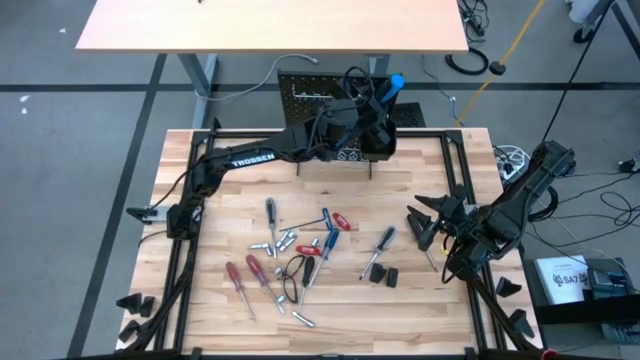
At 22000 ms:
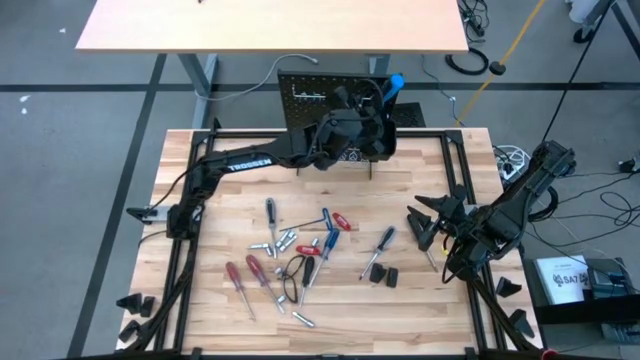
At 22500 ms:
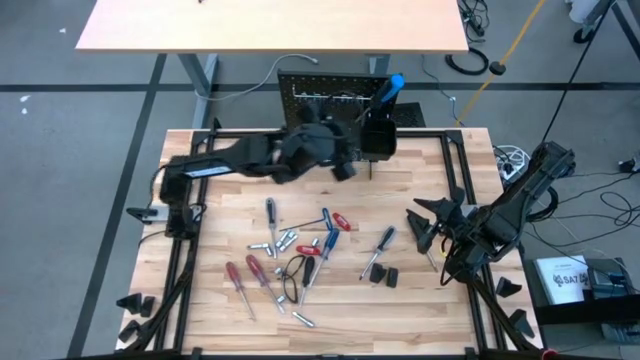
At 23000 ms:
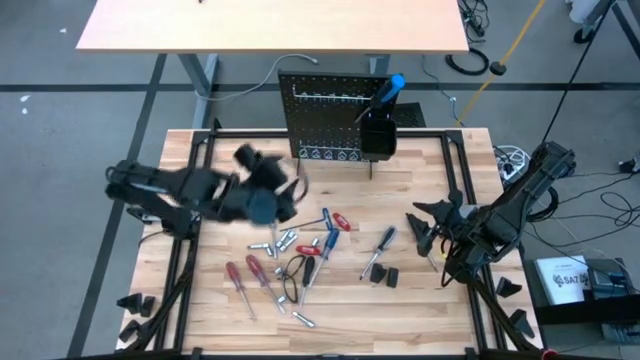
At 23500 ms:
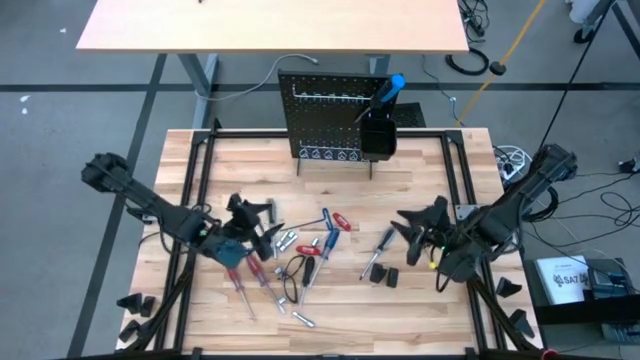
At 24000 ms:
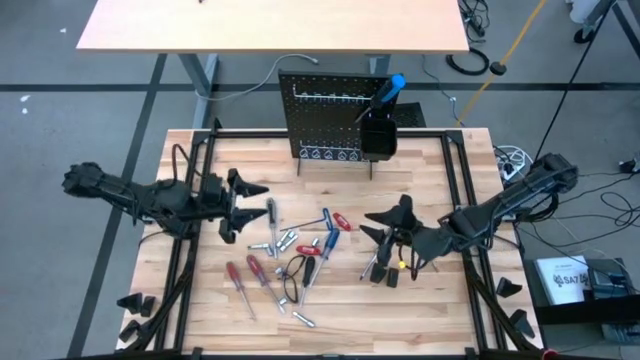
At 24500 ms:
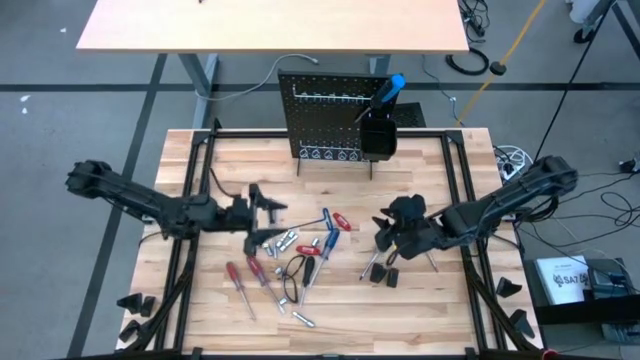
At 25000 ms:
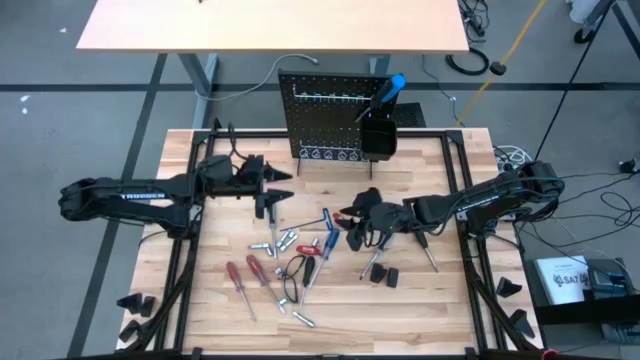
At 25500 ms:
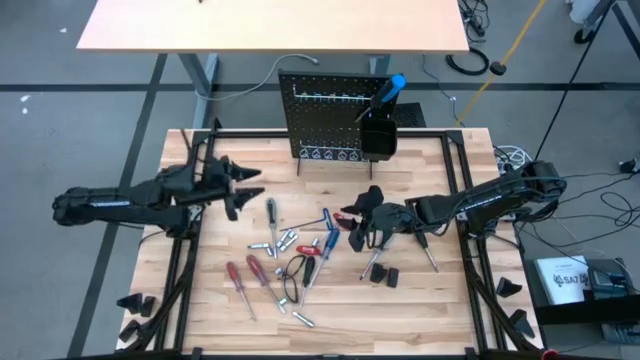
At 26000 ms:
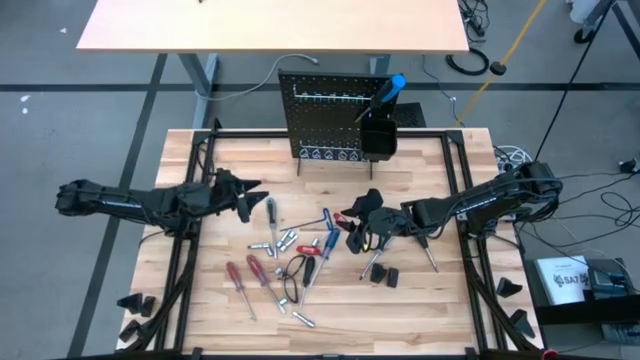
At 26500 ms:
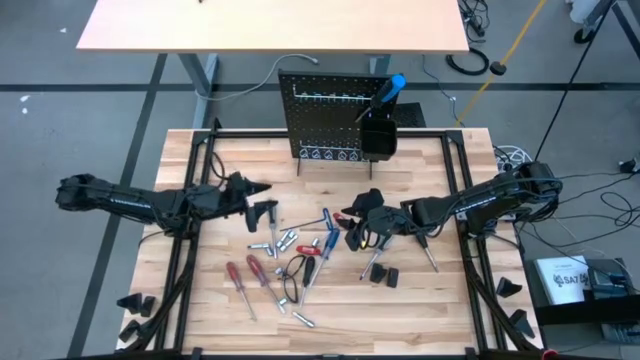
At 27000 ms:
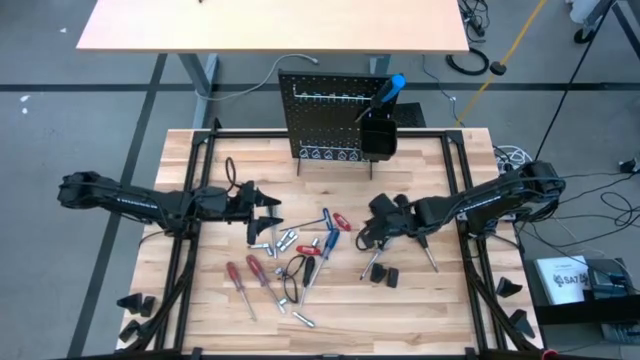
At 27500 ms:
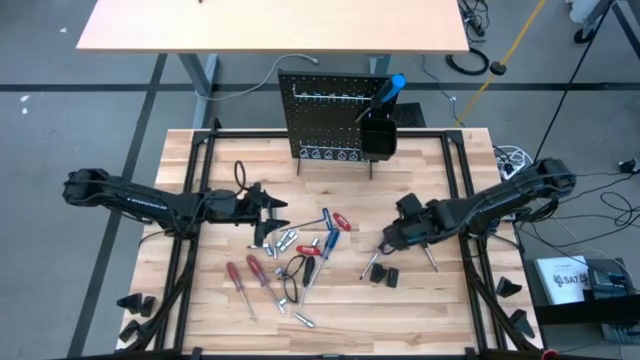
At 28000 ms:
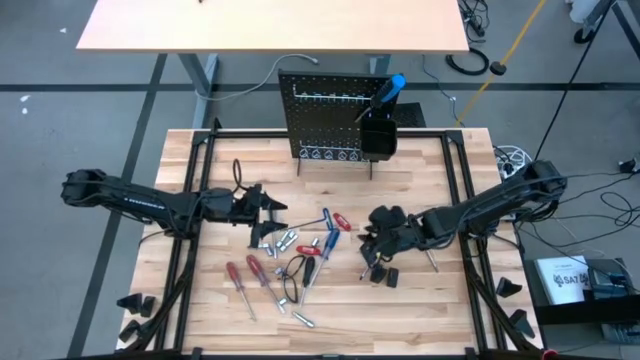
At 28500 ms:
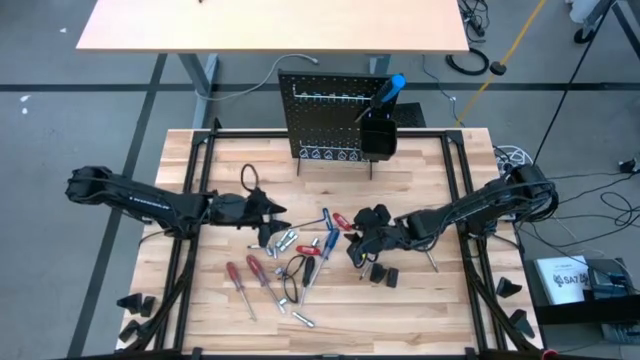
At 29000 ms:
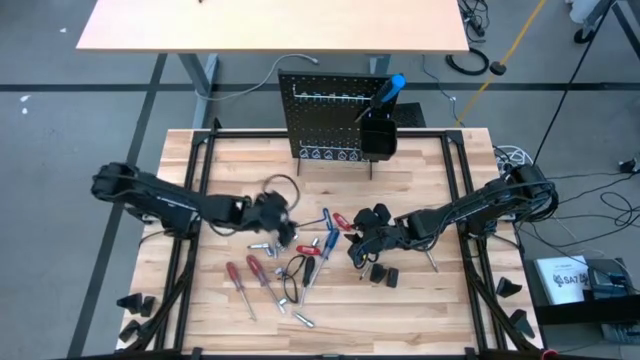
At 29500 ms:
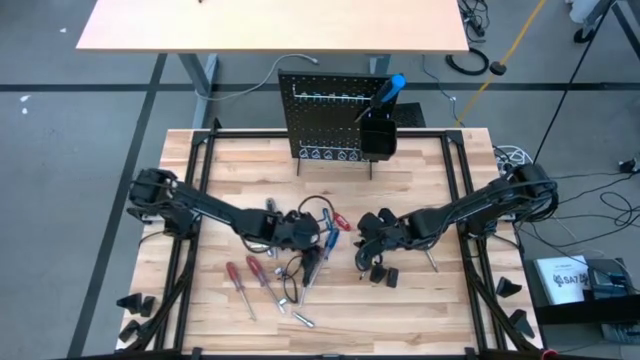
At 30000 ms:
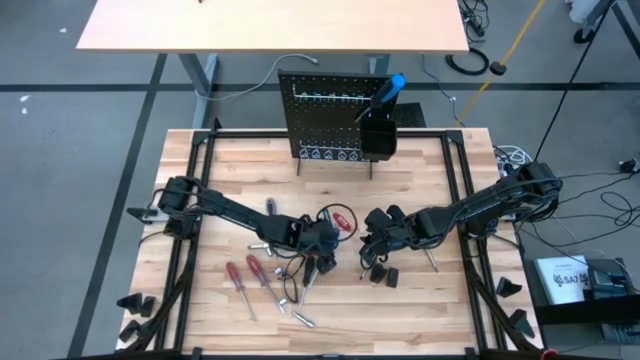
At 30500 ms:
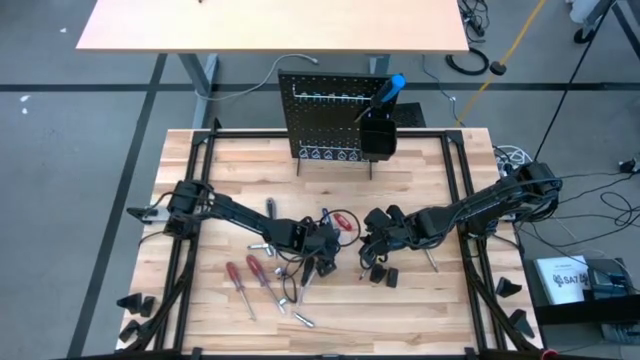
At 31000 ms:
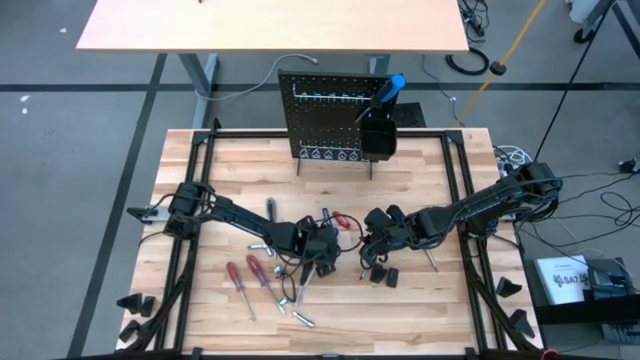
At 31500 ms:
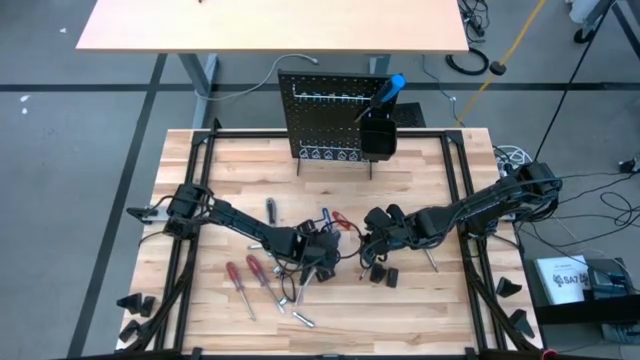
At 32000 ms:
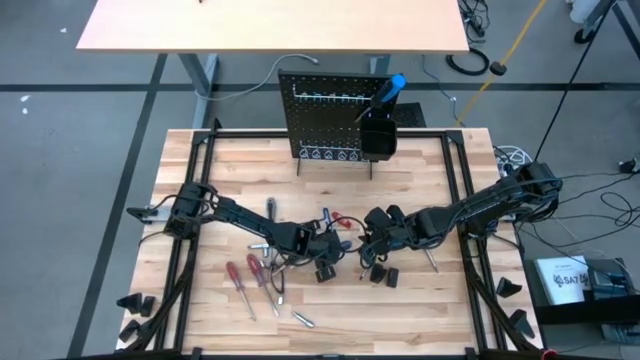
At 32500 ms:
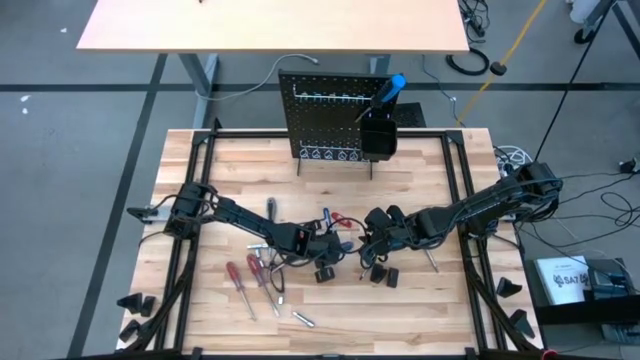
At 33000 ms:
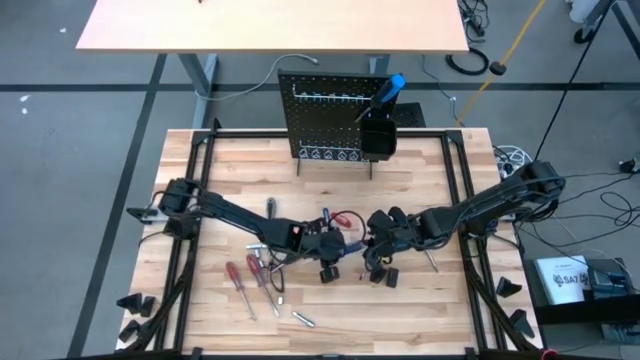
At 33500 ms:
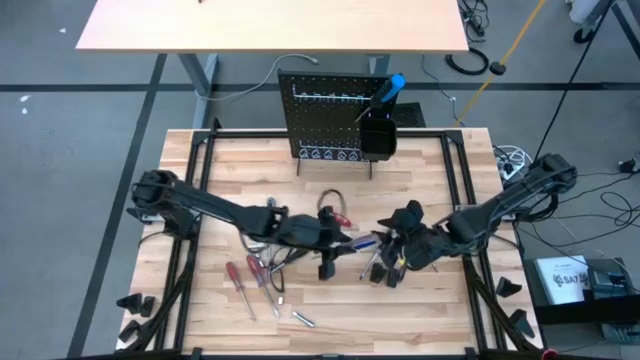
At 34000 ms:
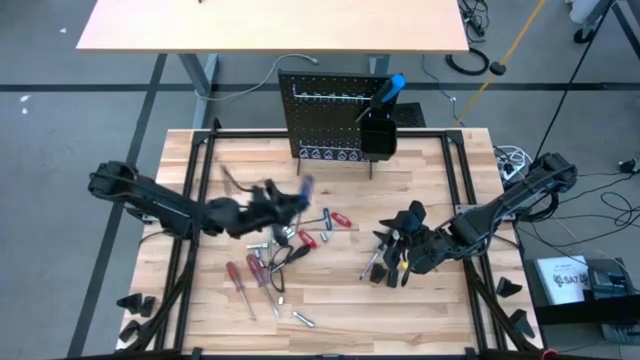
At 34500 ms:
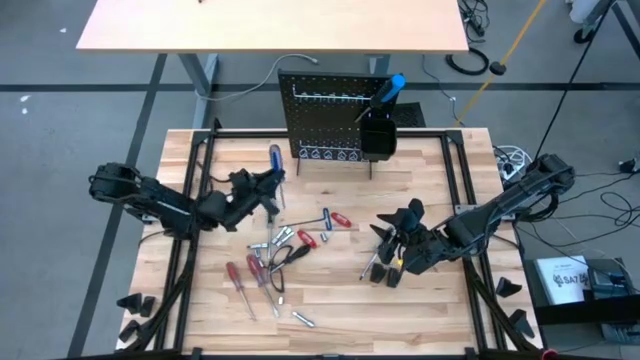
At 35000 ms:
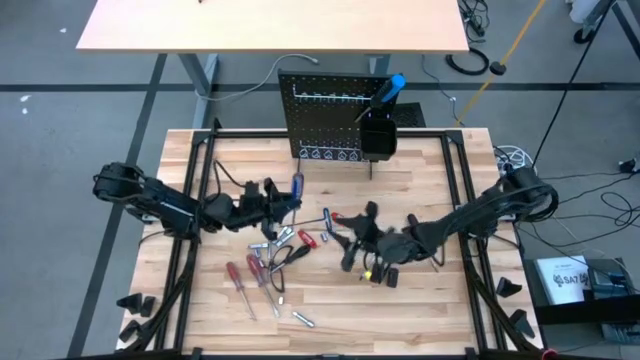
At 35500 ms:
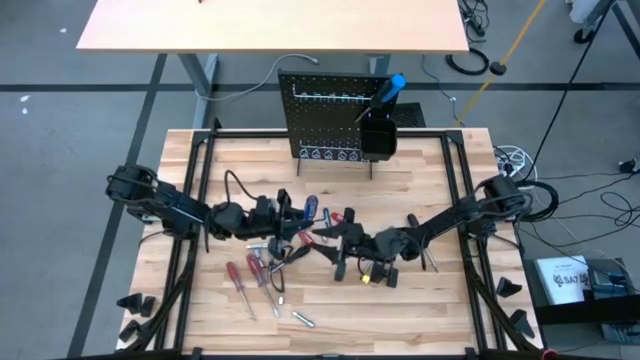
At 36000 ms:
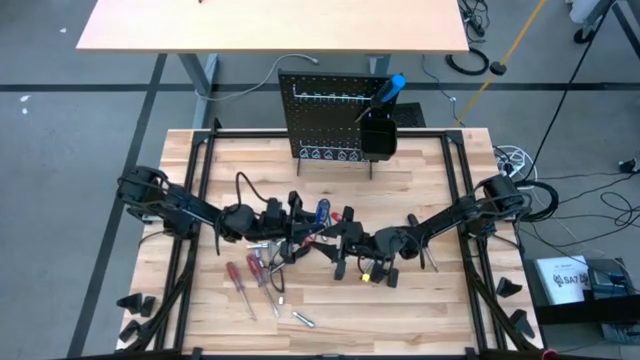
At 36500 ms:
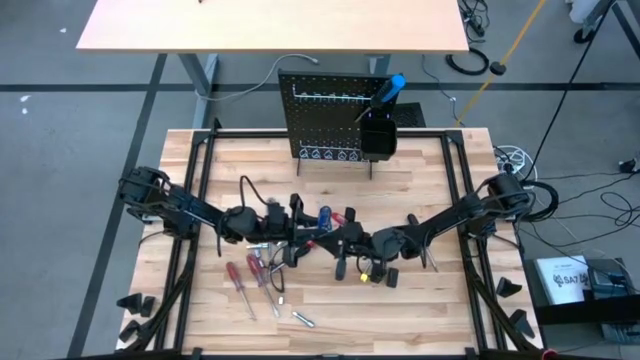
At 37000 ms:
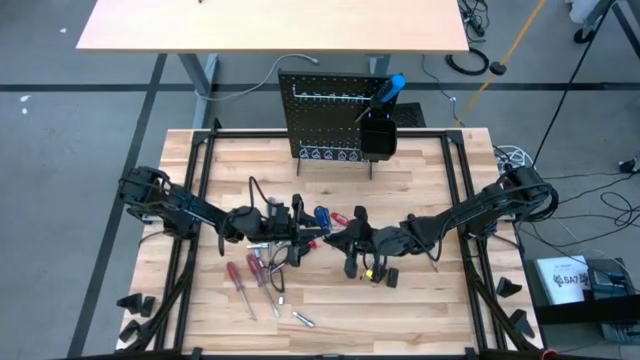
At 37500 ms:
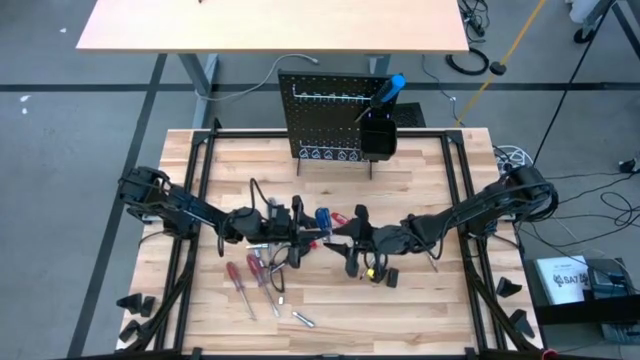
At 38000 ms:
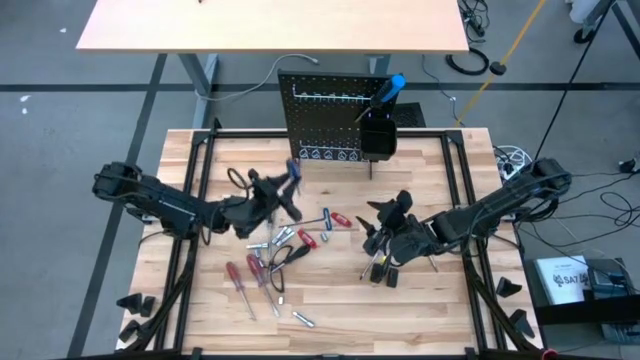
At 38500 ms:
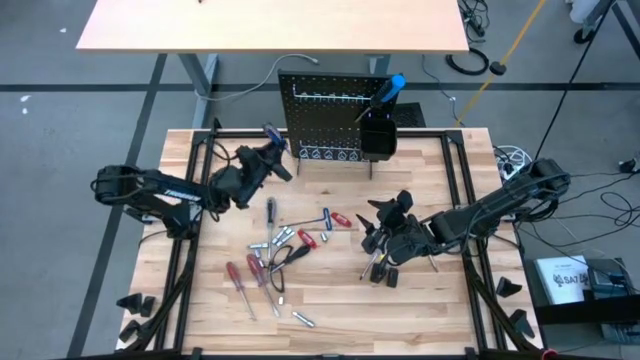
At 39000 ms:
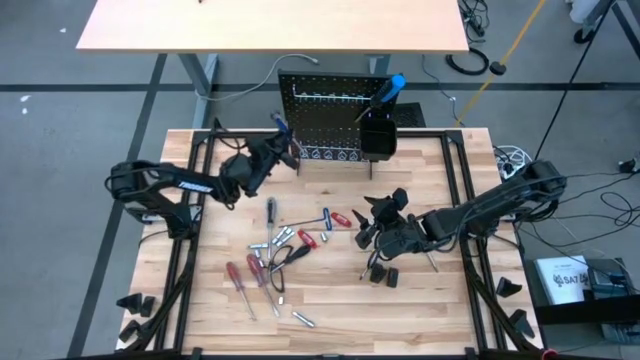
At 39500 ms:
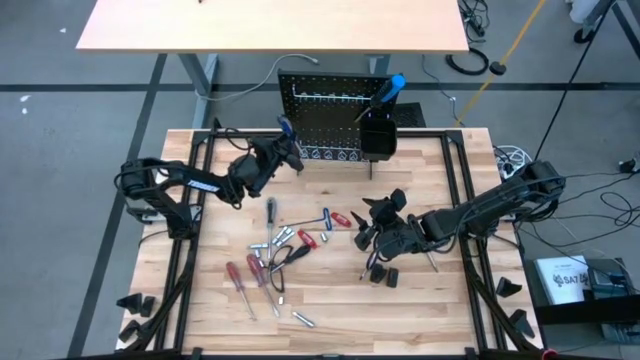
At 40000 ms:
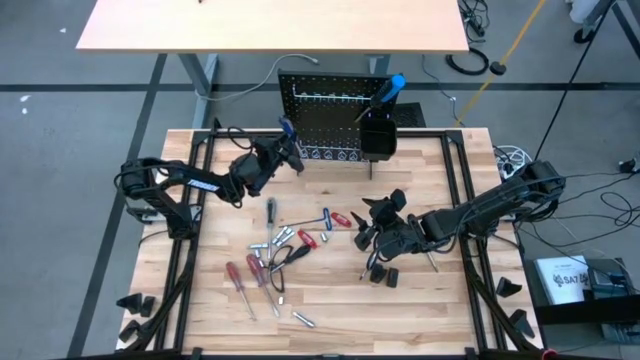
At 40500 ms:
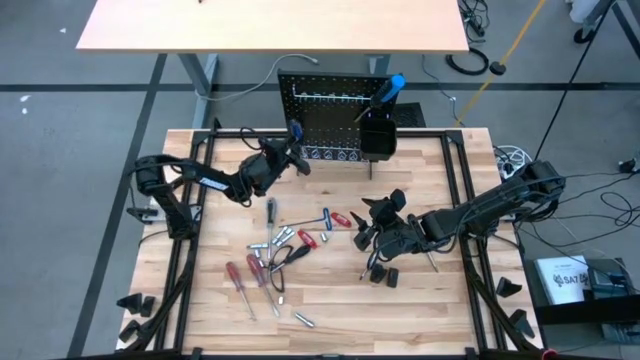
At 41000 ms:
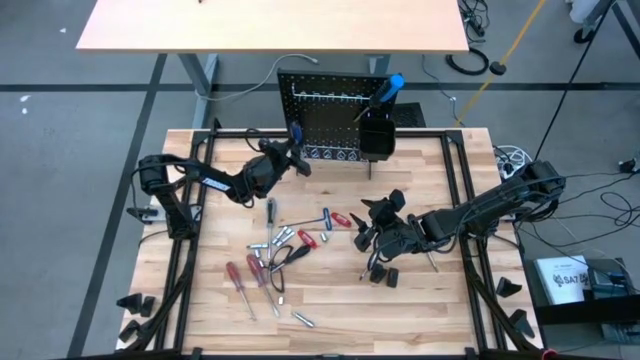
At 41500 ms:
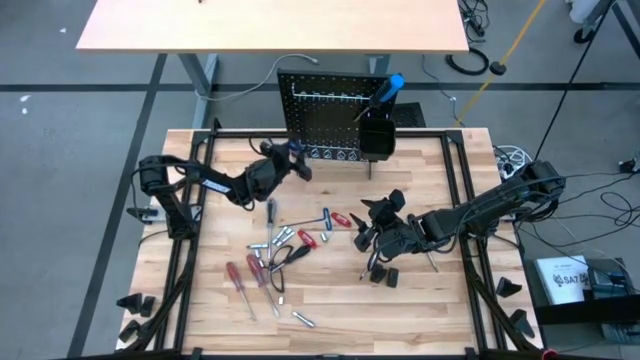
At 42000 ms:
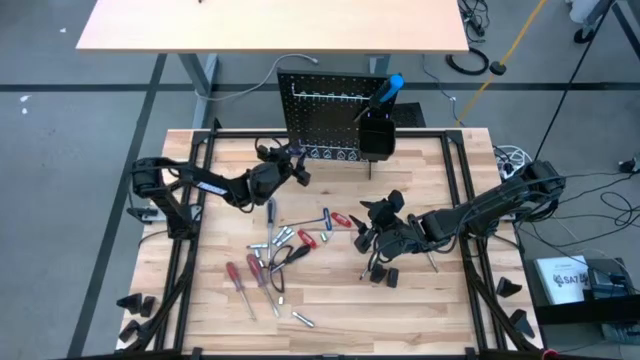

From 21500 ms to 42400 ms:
Task: Hang tools onto peg board
Hang the blue screwdriver onto the peg board
